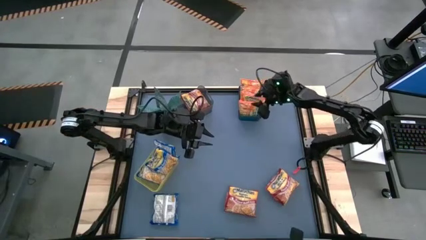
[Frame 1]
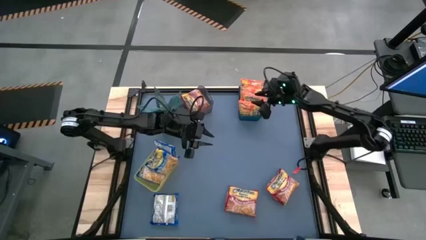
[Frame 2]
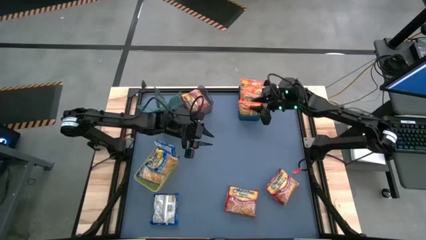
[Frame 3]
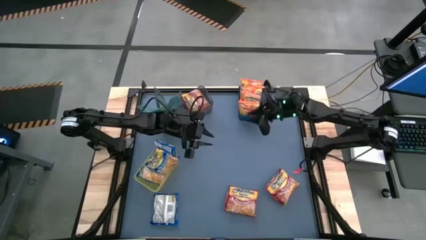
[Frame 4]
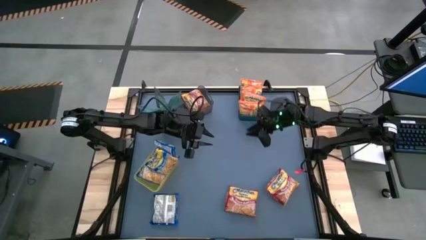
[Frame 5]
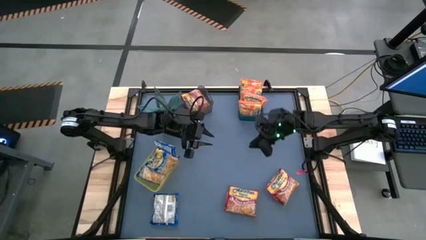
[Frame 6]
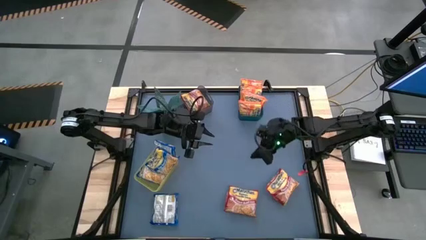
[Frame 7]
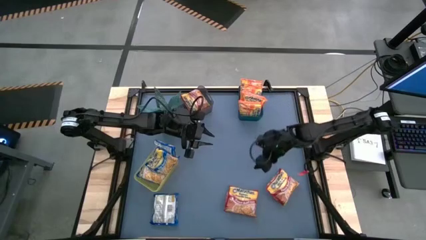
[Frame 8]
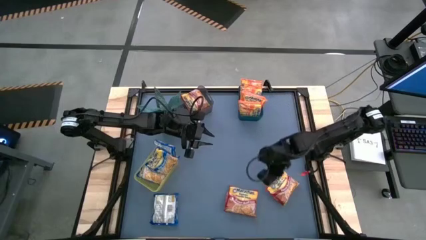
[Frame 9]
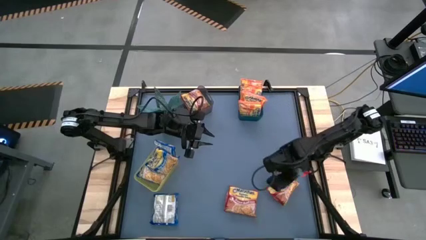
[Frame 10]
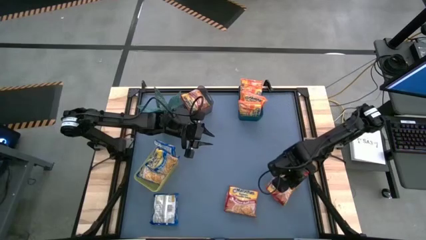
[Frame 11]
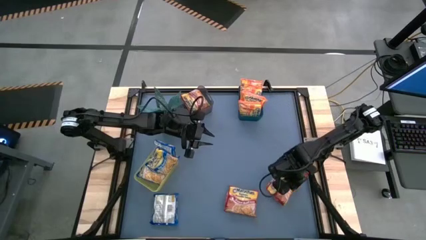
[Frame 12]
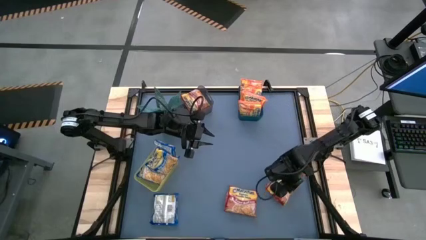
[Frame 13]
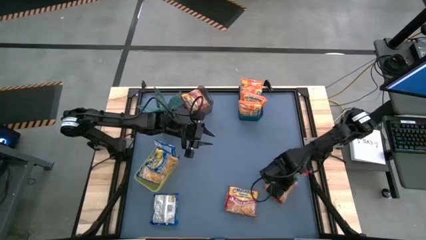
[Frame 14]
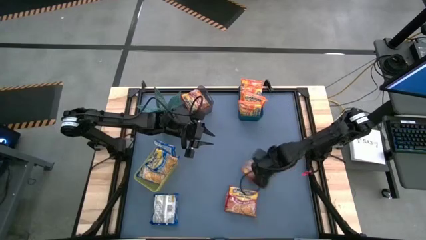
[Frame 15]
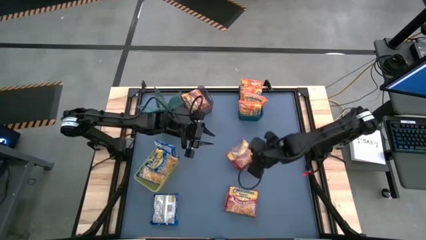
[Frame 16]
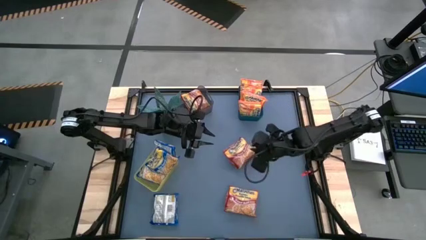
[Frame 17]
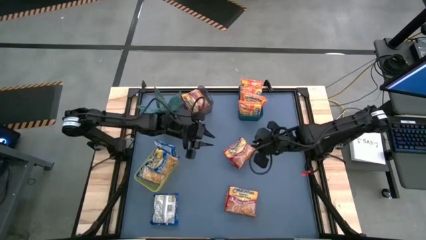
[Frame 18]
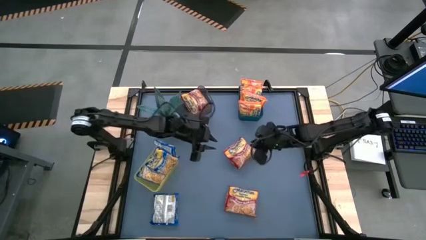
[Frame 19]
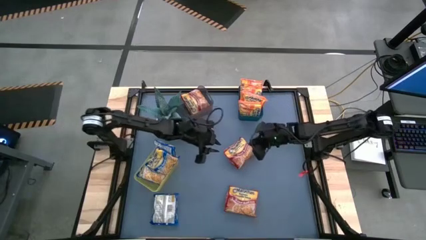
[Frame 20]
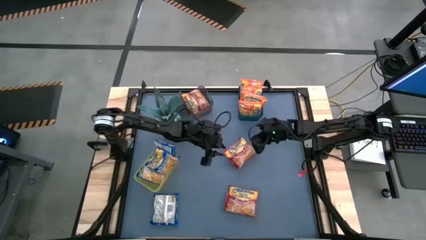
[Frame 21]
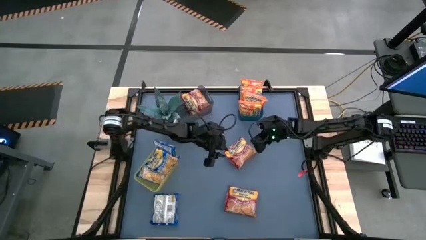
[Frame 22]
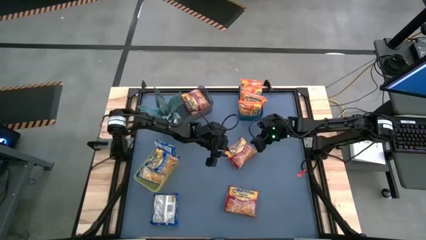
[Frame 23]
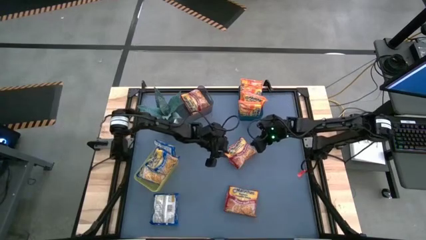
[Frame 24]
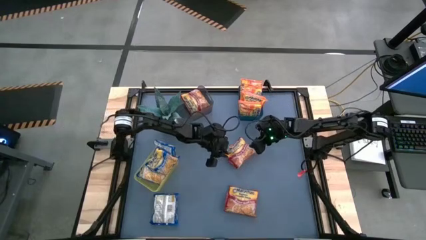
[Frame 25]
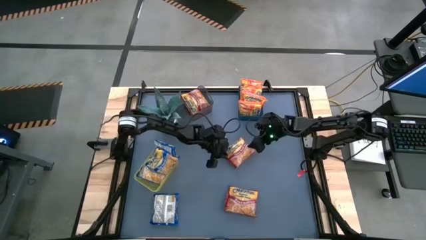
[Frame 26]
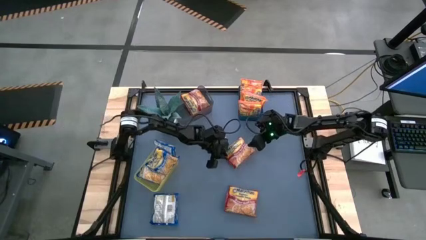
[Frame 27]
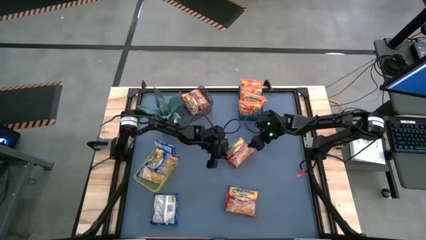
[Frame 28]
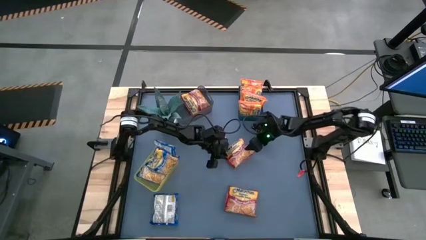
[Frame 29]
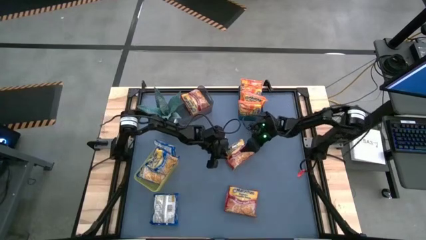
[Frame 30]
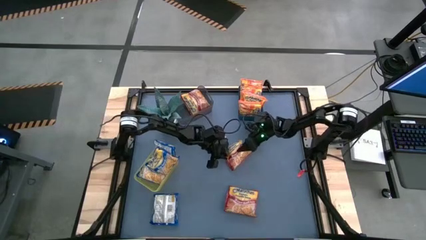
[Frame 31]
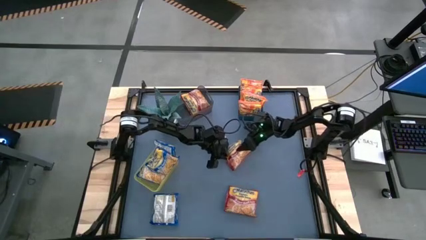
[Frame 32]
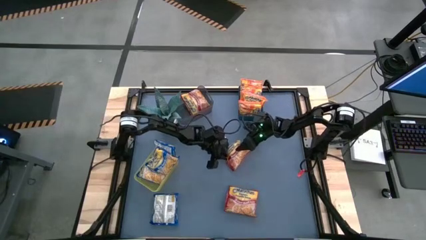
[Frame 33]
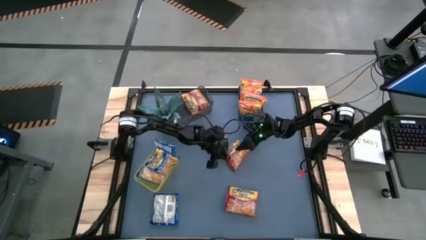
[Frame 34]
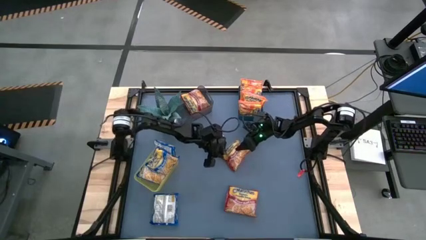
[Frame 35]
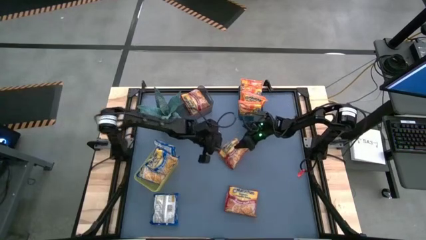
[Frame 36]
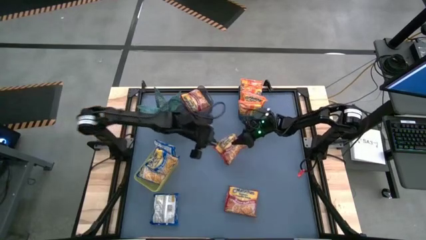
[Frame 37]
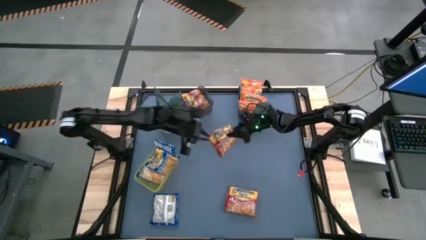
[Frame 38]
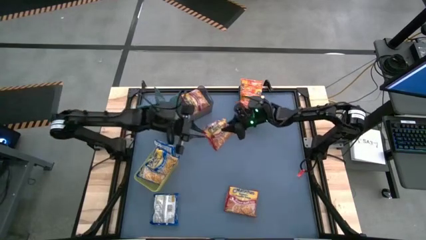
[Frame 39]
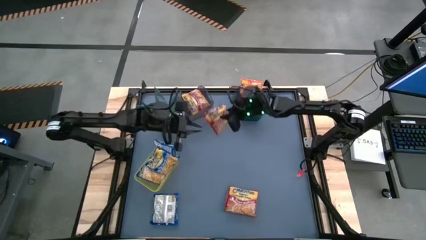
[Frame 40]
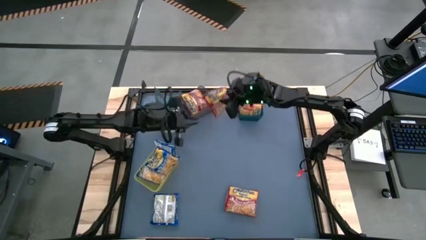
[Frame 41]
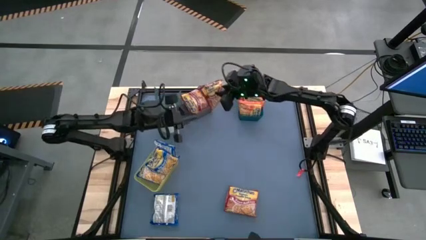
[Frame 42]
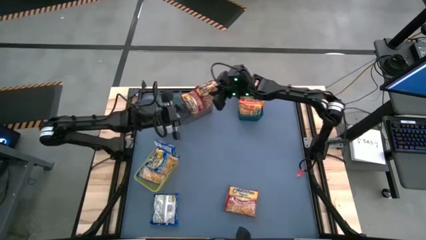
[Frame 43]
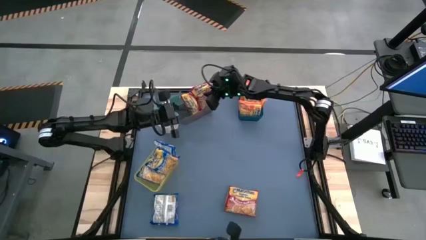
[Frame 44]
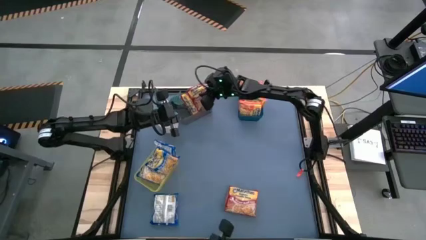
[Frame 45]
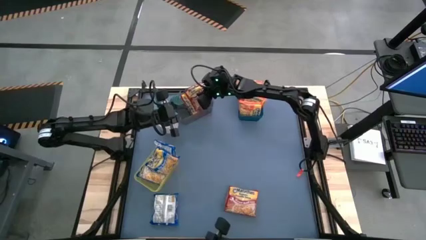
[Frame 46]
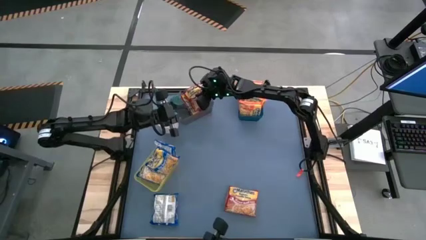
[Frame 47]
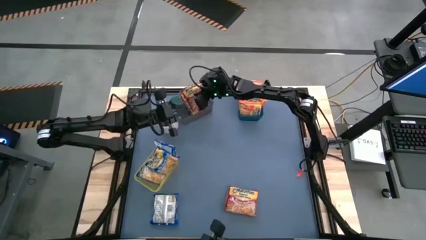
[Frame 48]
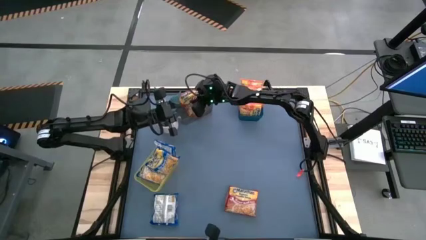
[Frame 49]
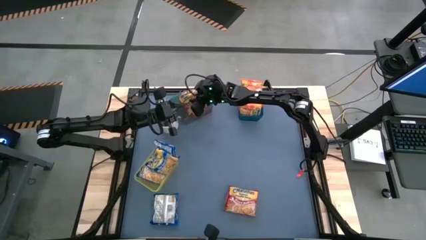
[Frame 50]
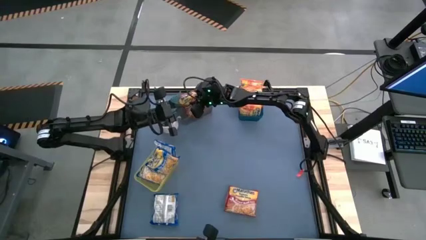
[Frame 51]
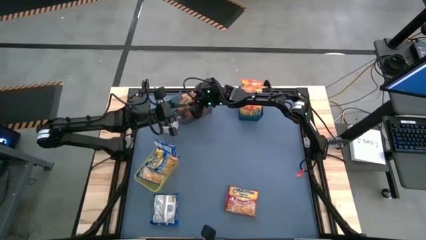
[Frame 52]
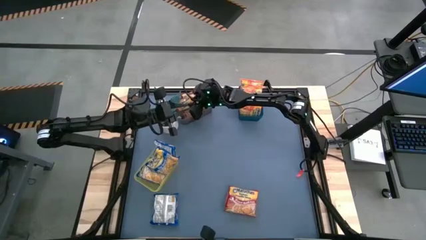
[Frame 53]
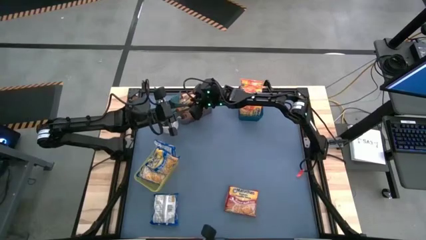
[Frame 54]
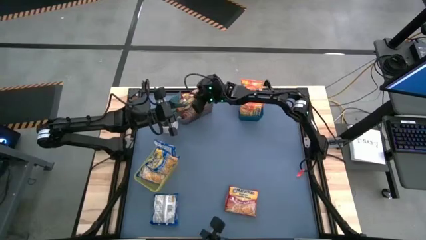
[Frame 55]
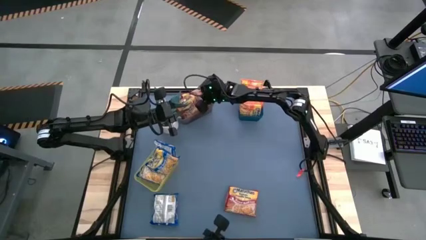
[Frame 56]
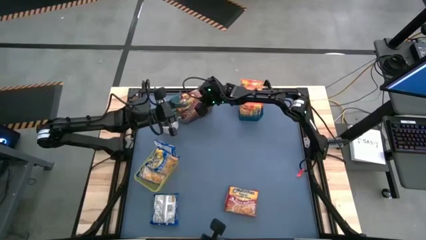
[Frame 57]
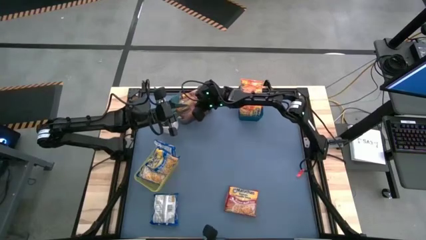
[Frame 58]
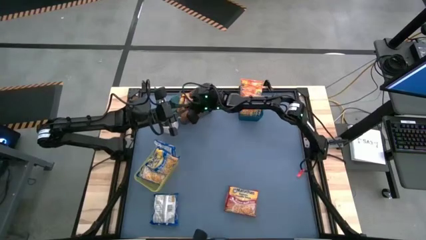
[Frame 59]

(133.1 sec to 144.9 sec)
Task: Sort Maruchan noodles
Put the red noodle pack into the black bin

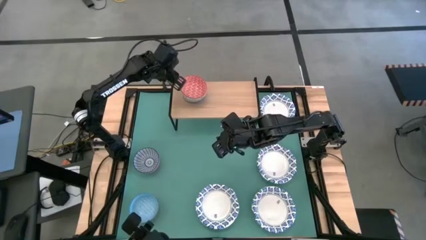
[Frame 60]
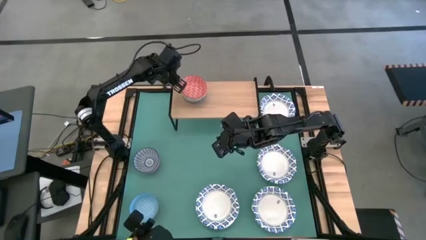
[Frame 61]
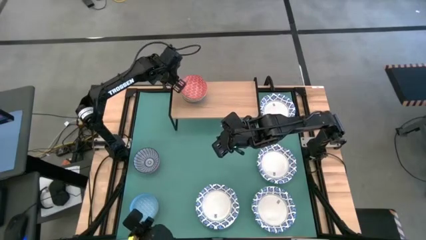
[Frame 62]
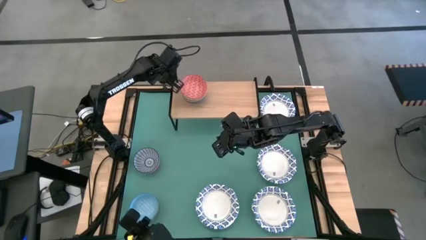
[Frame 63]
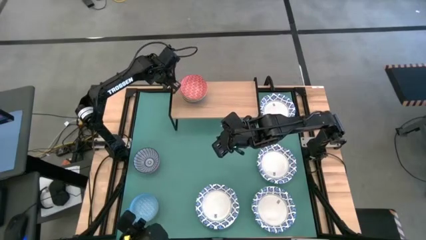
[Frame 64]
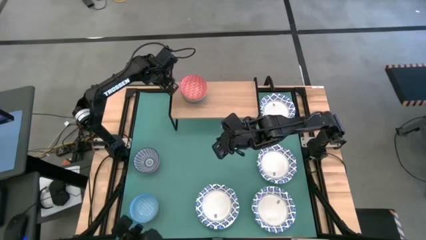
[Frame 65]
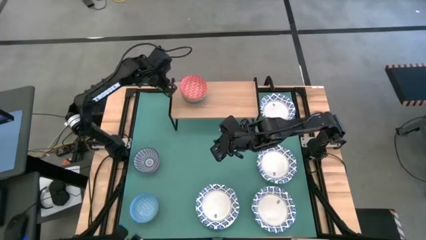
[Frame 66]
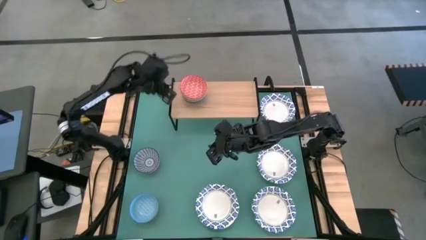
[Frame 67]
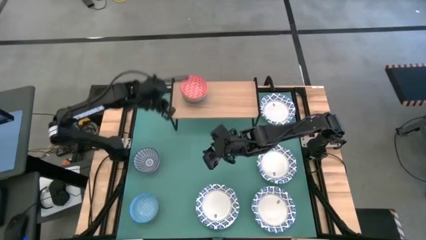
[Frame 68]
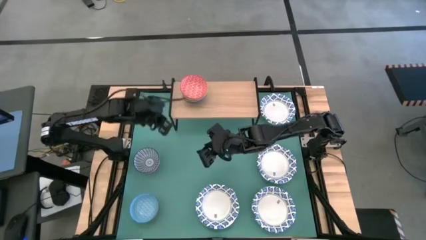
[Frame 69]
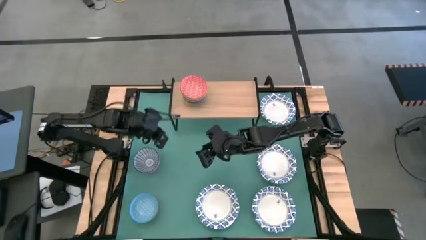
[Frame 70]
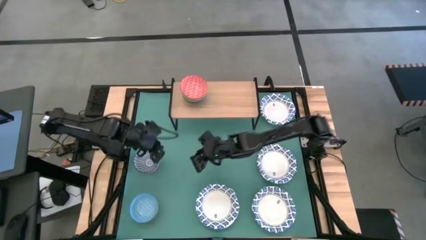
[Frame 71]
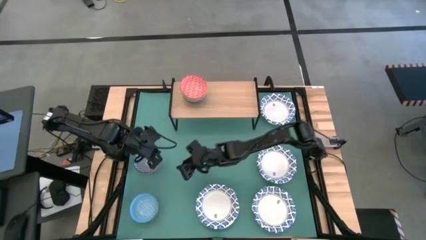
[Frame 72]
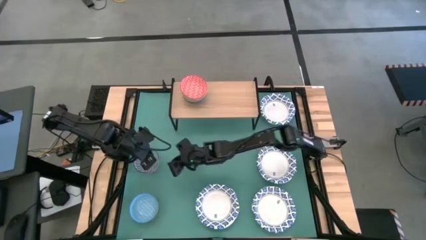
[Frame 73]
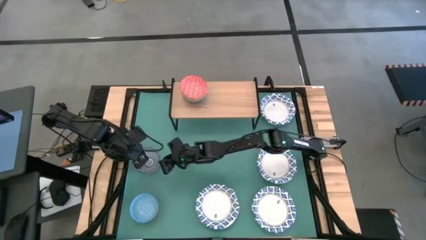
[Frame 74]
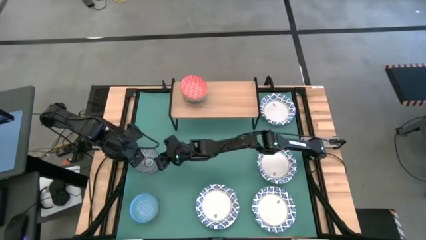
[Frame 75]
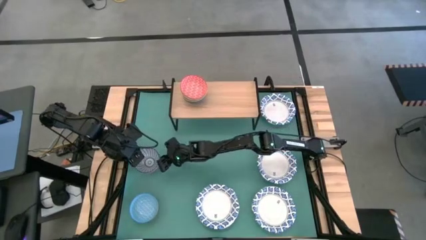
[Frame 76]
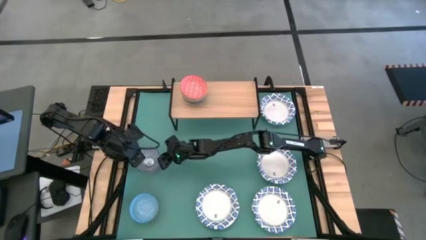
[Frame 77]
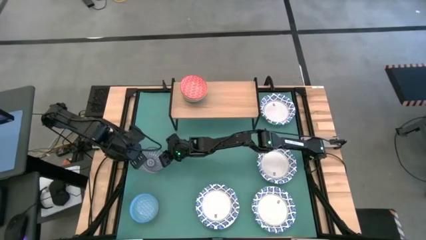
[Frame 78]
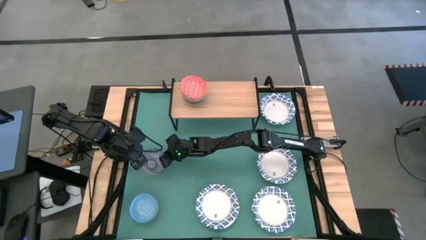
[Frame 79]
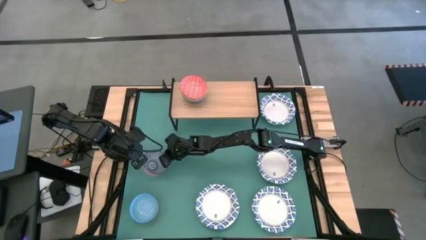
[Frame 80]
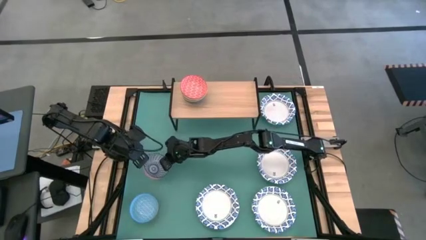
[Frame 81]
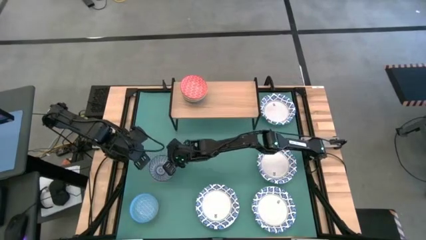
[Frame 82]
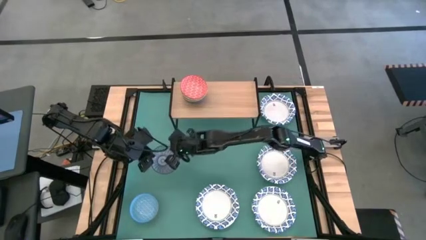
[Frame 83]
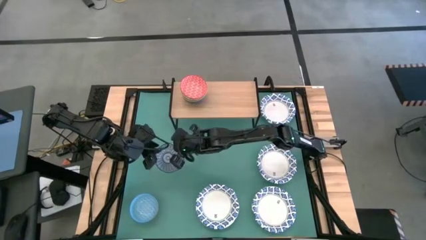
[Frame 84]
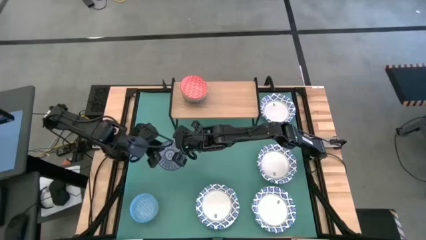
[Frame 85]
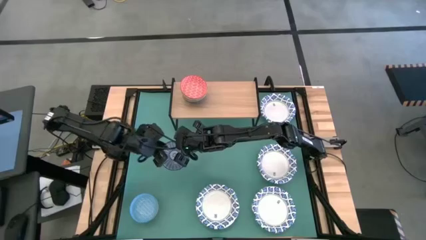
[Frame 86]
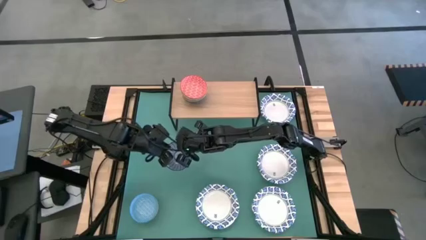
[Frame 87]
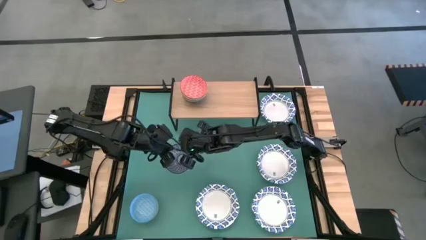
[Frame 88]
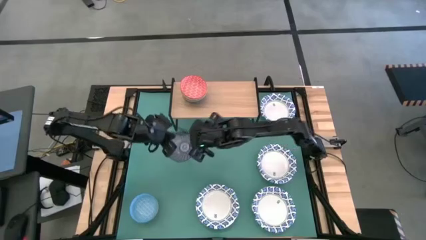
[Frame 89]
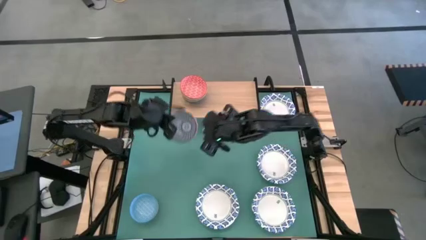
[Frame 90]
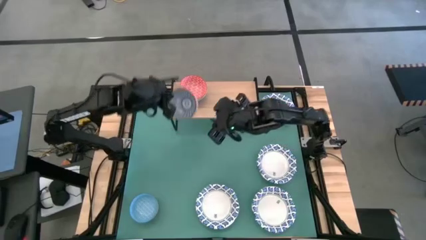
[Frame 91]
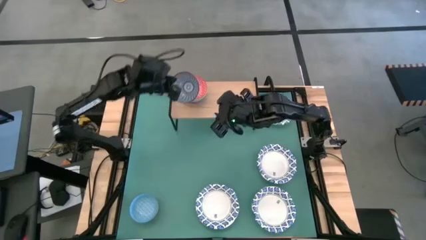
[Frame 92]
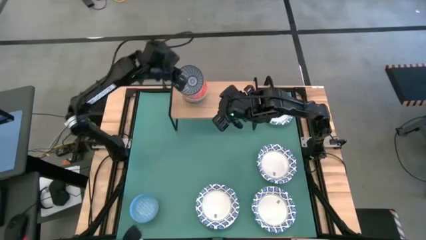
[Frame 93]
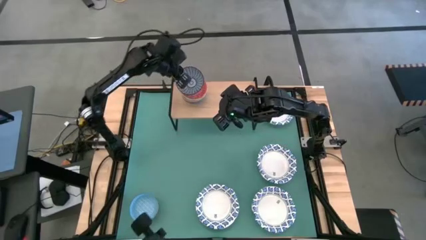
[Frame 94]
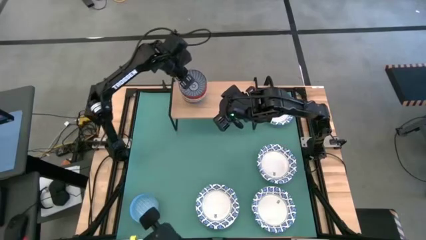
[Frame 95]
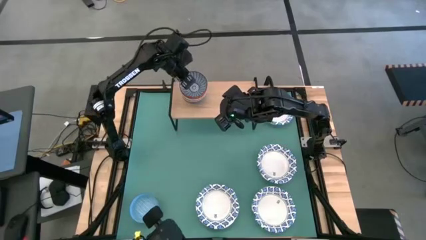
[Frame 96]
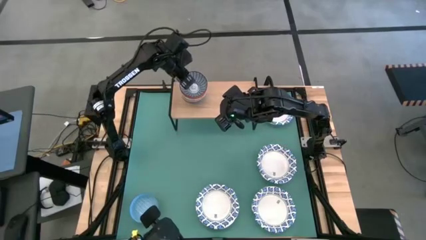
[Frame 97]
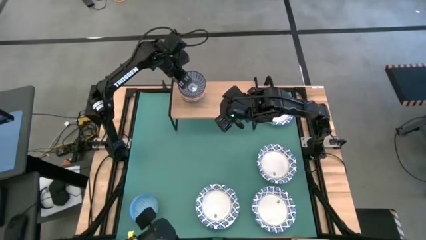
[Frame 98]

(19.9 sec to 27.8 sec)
Task: Place and stack bowls onto a shelf
Stack the dark blue bowl on top of the red bowl on the shelf
